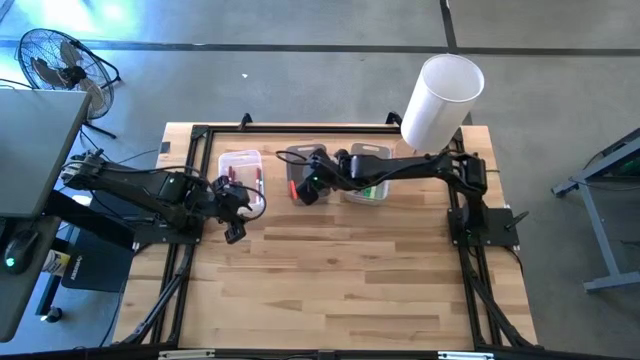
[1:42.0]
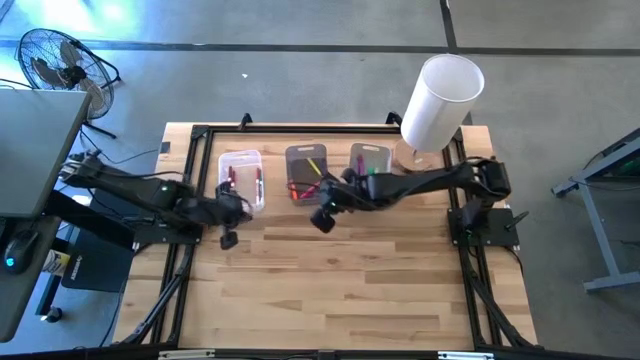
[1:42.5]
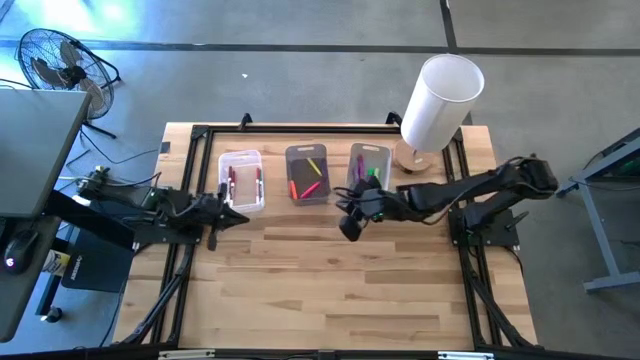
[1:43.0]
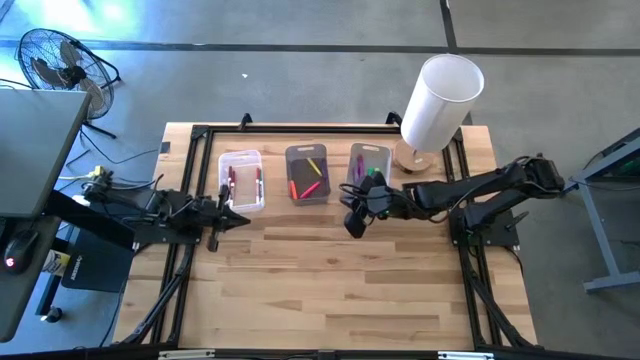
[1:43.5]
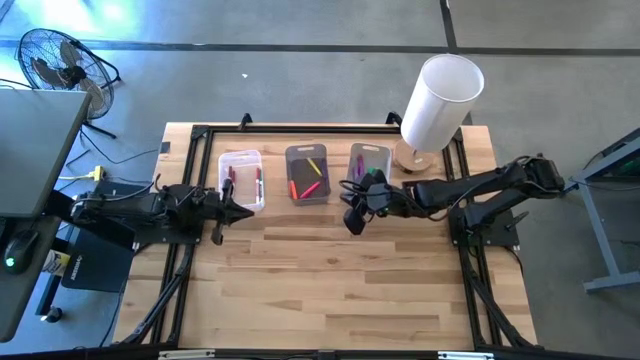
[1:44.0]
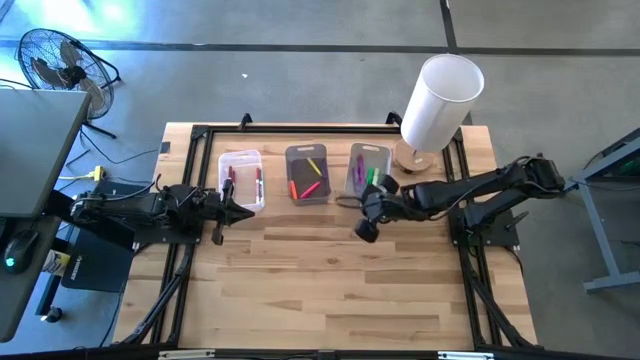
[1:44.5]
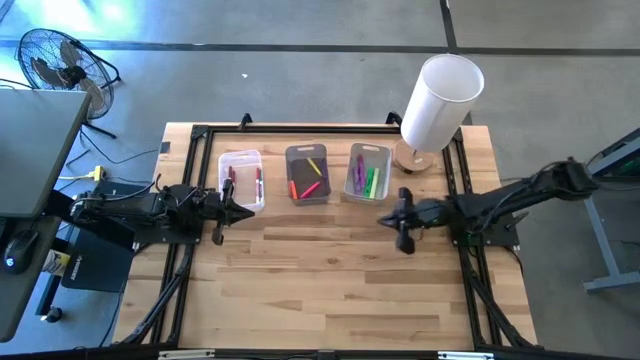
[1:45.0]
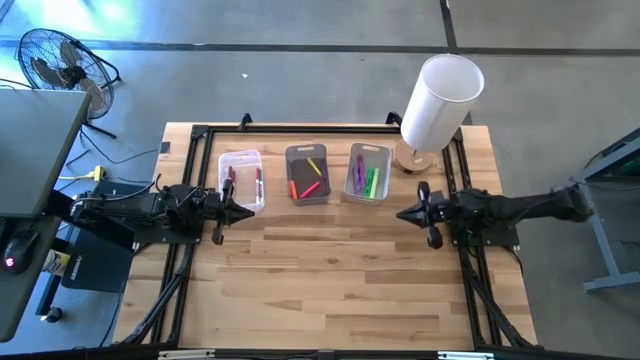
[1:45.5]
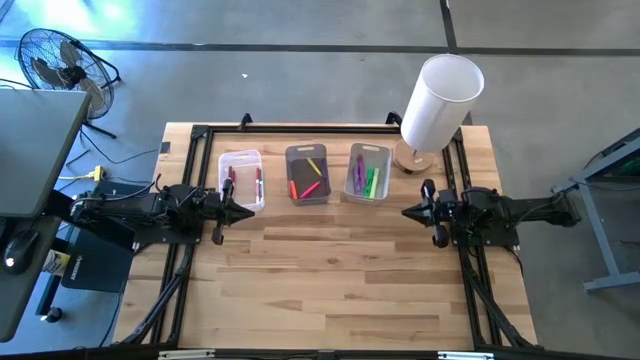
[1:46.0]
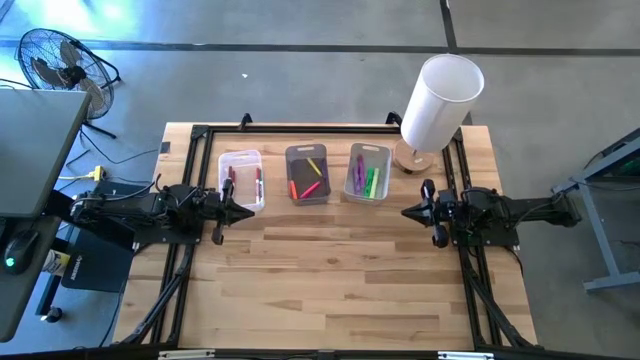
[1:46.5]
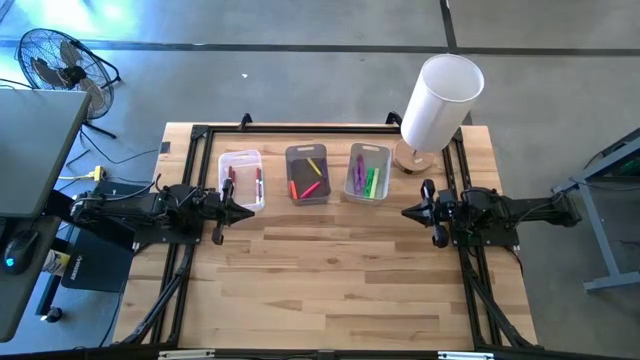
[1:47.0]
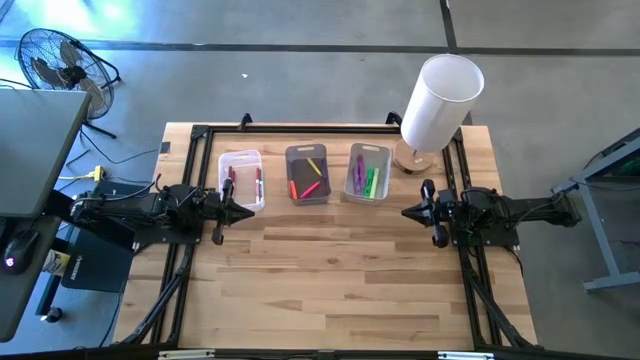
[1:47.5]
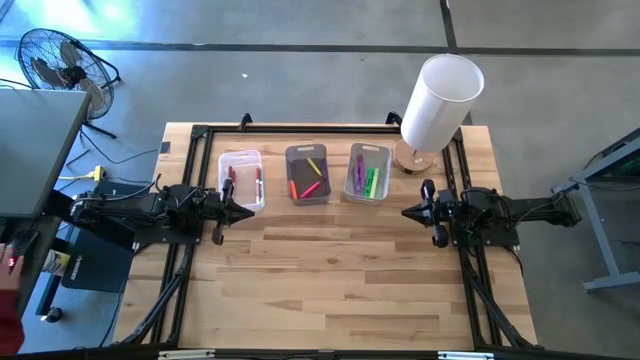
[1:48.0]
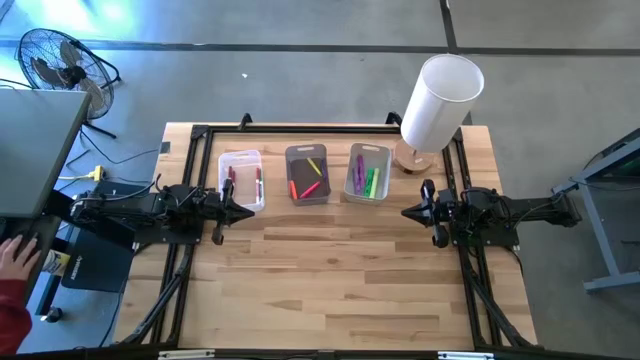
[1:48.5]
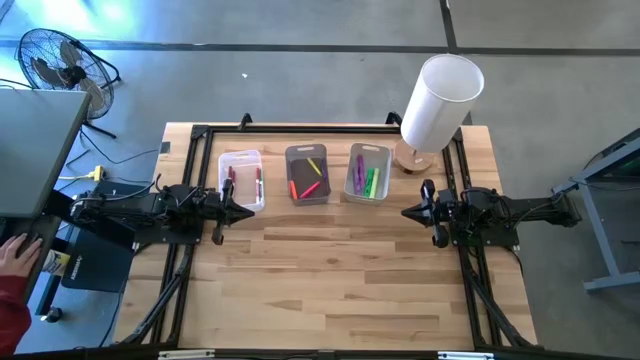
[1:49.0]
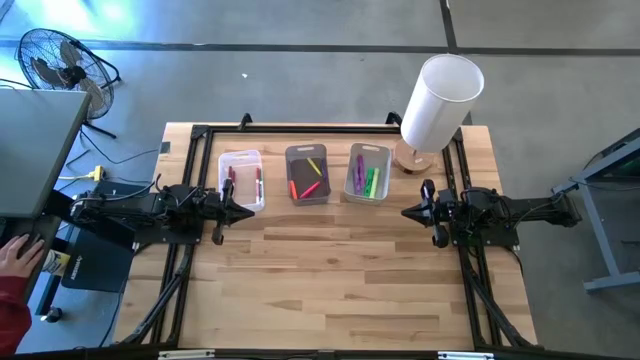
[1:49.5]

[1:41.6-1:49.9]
Task: Pick & Place Markers
Return to Home Position
